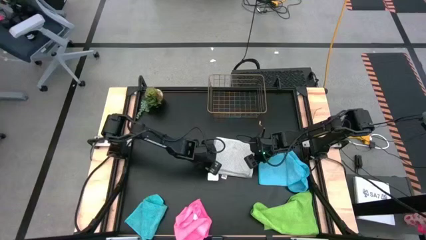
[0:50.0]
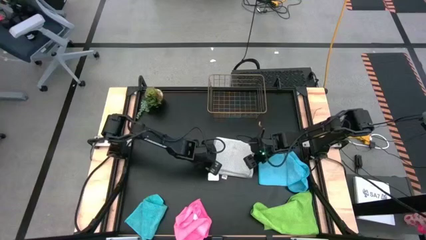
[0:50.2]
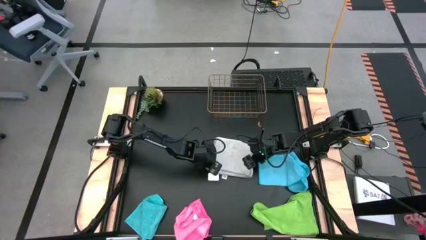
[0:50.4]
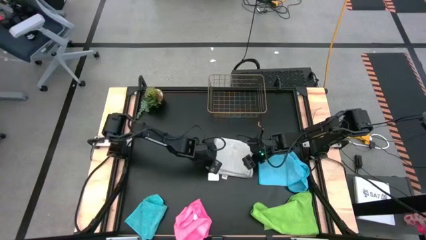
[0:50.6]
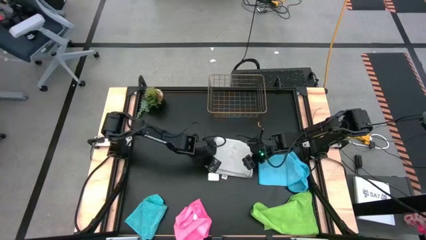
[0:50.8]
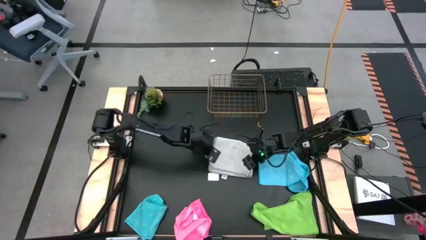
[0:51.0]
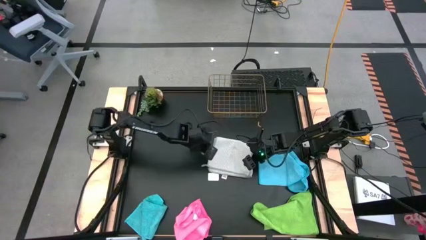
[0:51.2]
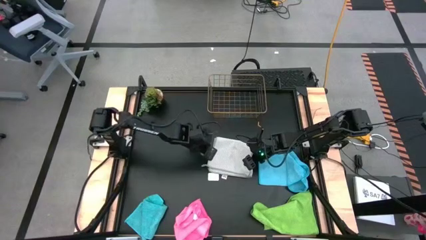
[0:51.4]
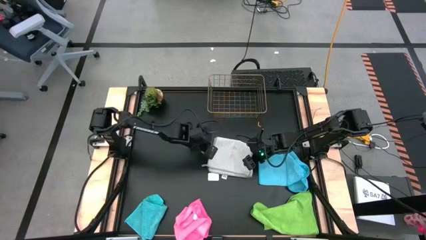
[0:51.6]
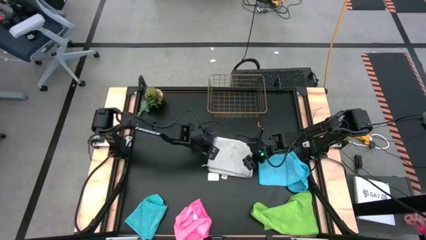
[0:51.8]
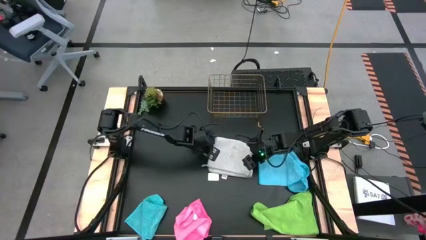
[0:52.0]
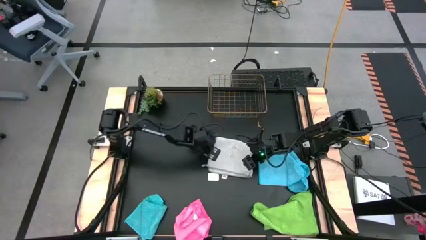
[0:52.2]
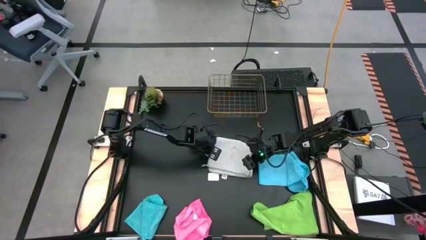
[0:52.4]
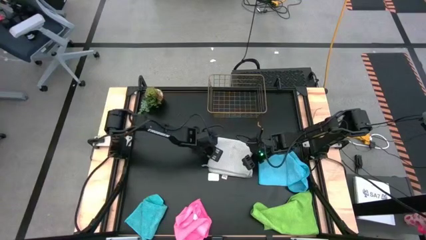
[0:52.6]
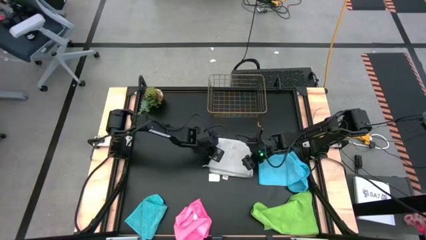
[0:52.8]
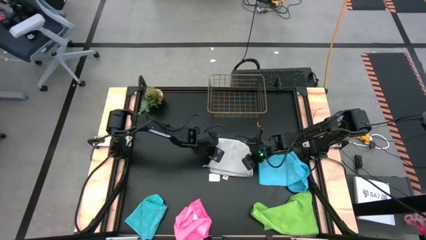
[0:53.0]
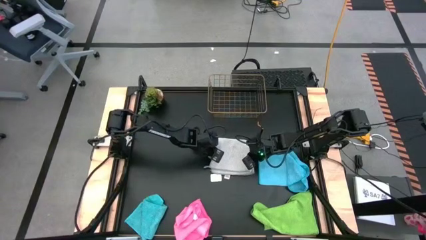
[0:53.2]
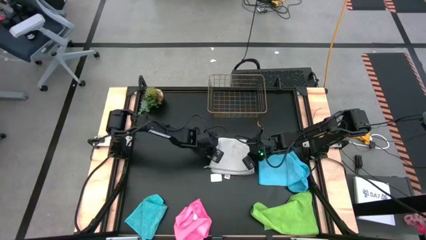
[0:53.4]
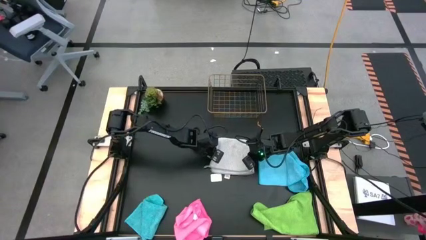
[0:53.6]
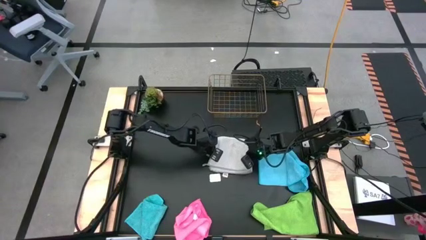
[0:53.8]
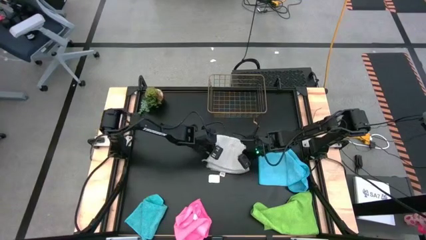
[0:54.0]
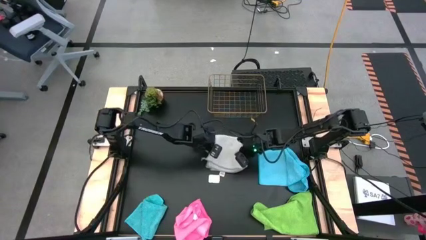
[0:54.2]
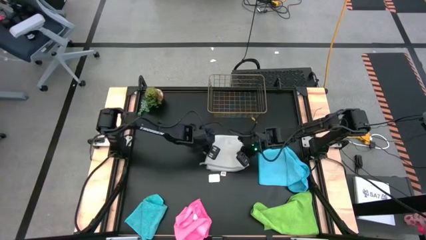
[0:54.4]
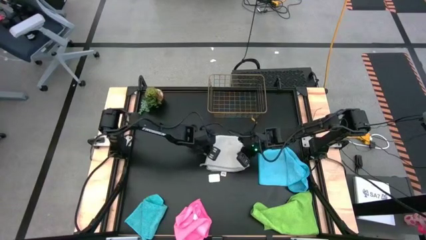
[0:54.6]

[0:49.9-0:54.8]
Task: Fold microfiber towels
Put the gray towel into the wire basket

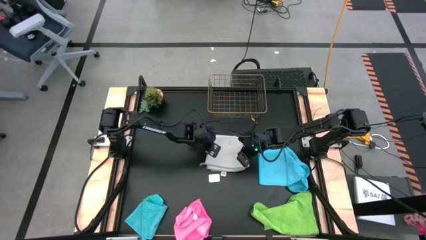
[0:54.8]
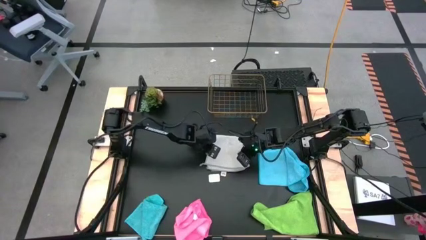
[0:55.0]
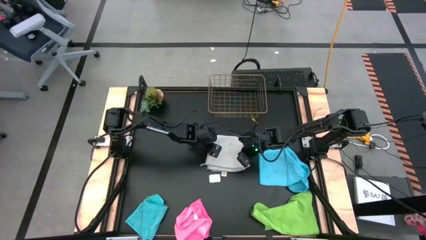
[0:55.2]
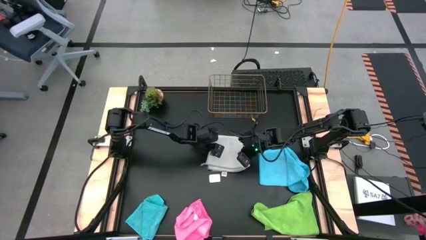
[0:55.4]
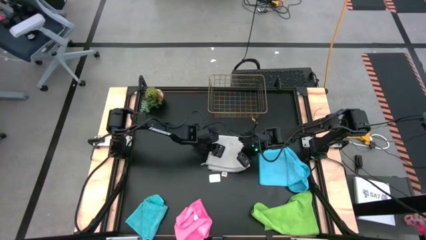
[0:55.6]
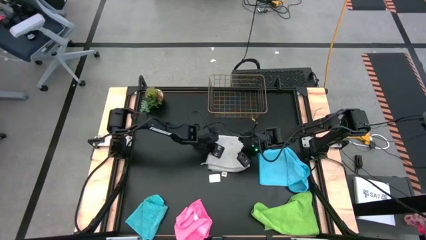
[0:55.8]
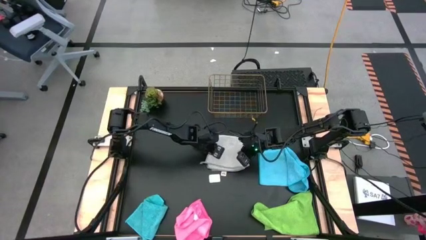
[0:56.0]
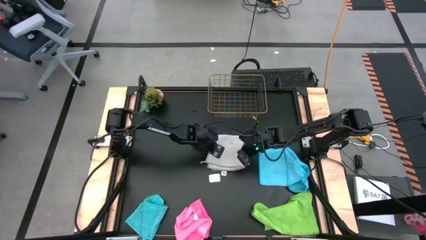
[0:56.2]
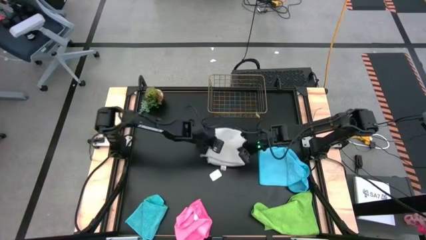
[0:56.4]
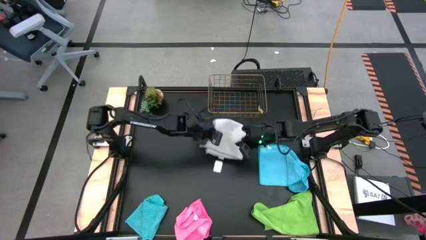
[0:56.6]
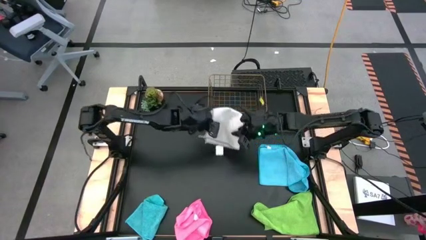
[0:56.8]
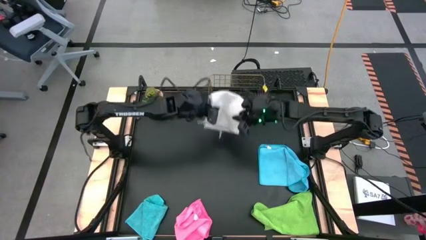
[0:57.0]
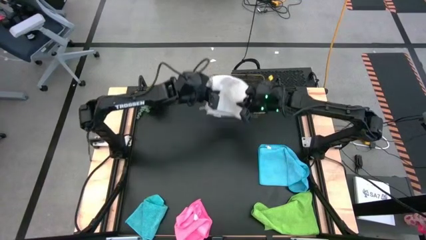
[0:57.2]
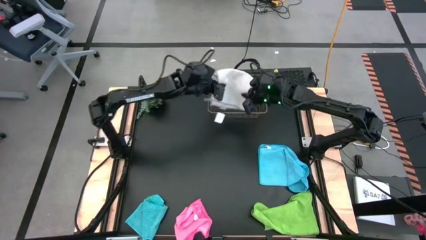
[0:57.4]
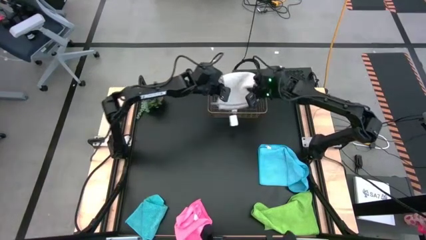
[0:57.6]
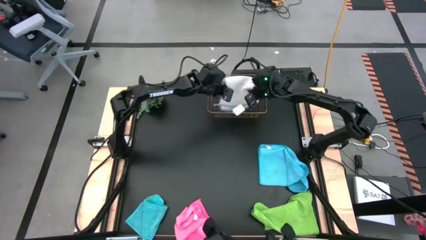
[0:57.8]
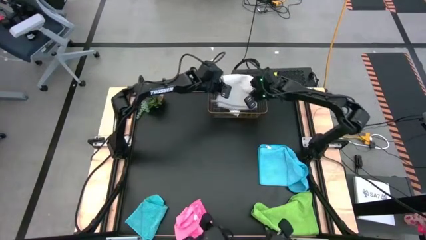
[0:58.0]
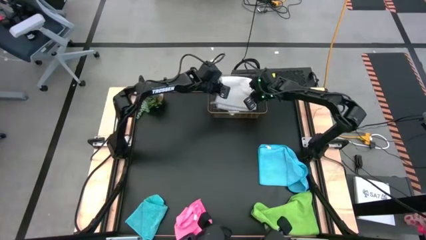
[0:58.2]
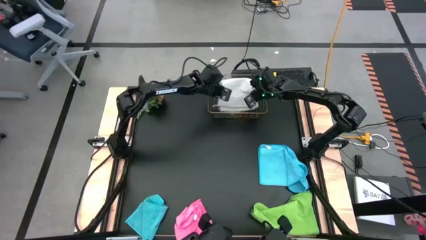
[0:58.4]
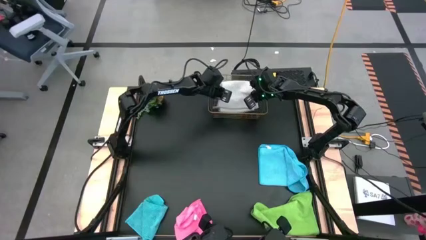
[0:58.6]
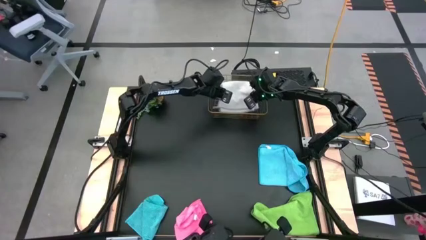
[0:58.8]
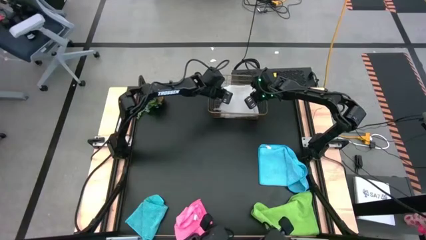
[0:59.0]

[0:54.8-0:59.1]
Put the gray towel into the wire basket

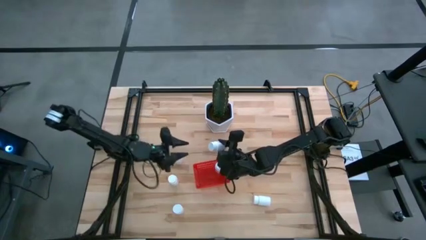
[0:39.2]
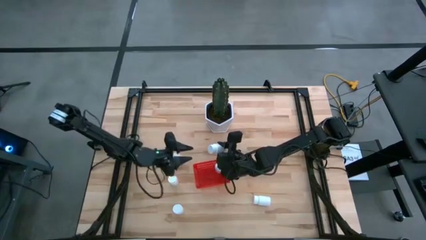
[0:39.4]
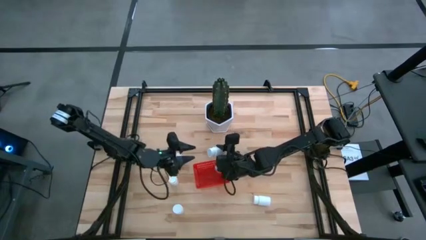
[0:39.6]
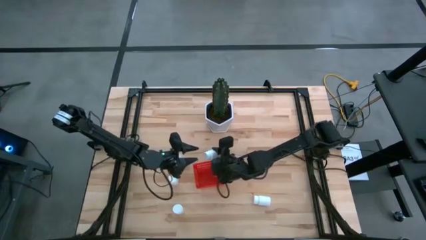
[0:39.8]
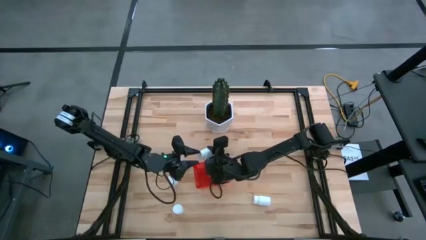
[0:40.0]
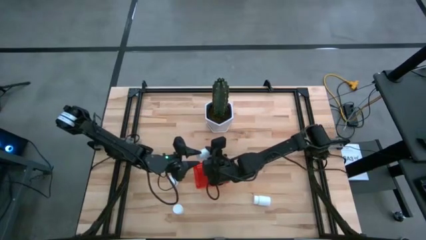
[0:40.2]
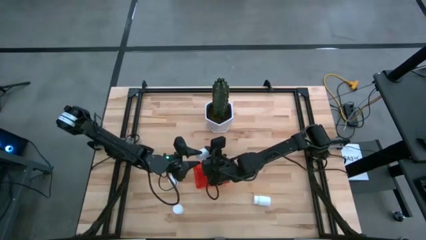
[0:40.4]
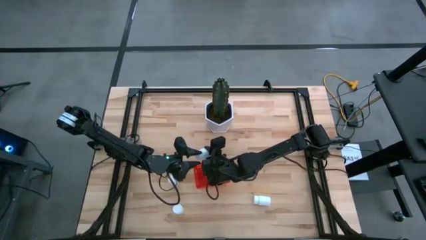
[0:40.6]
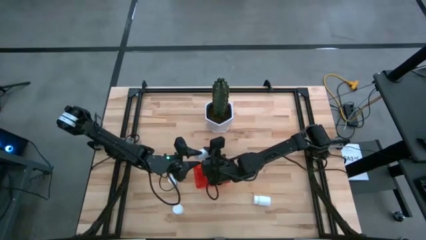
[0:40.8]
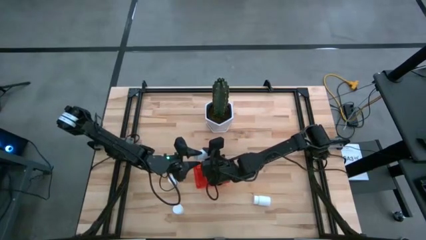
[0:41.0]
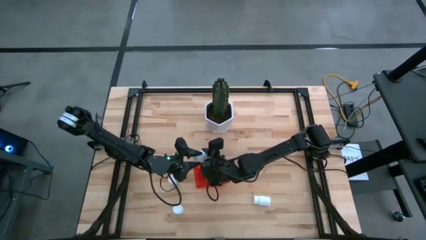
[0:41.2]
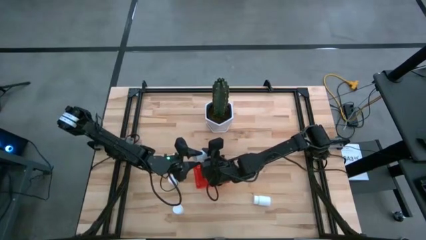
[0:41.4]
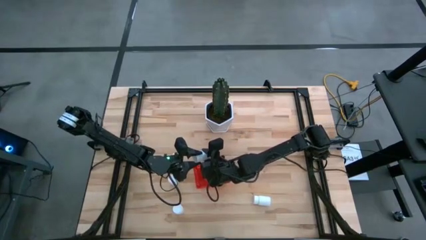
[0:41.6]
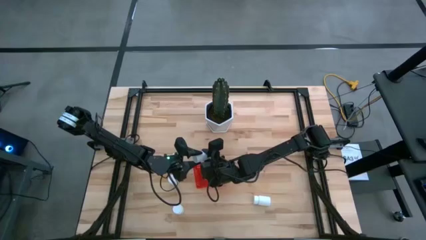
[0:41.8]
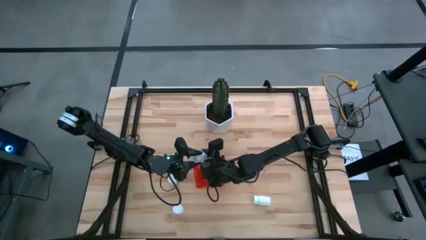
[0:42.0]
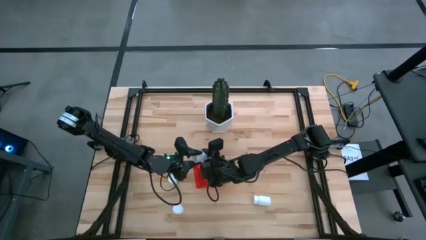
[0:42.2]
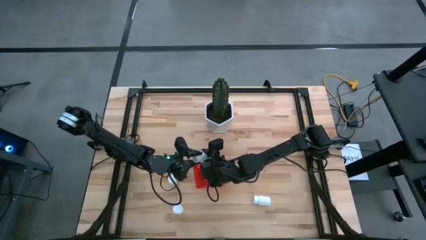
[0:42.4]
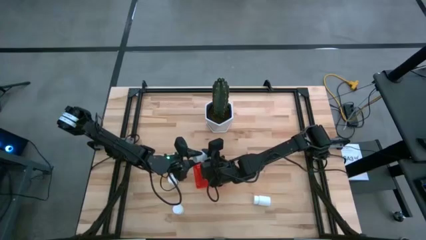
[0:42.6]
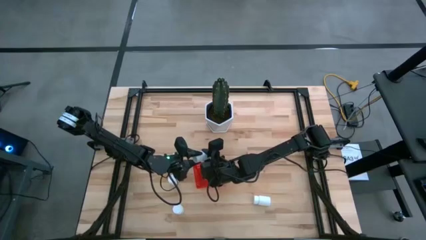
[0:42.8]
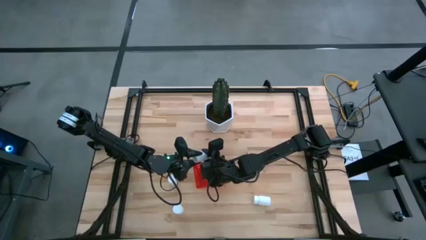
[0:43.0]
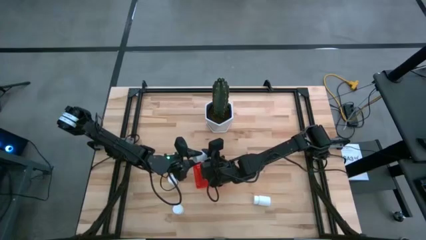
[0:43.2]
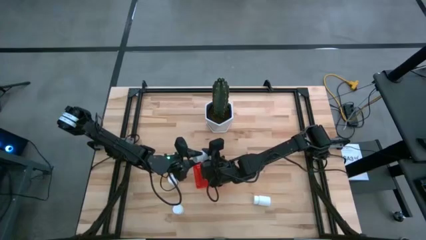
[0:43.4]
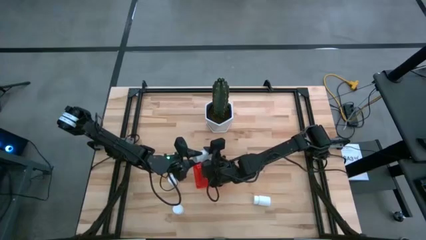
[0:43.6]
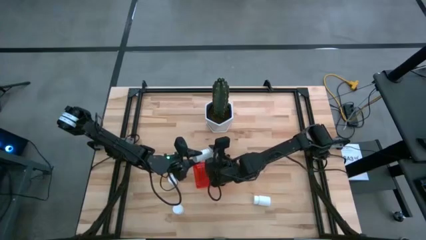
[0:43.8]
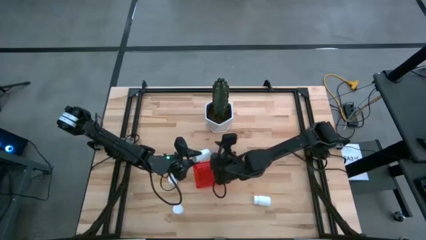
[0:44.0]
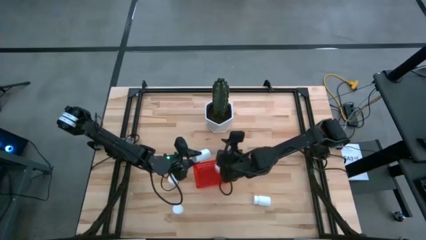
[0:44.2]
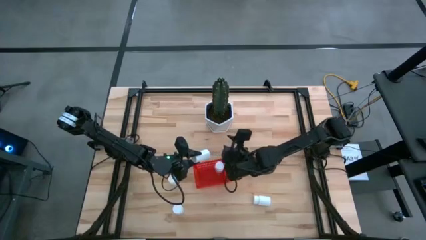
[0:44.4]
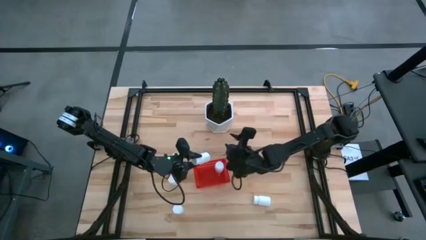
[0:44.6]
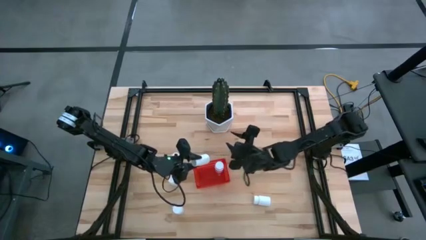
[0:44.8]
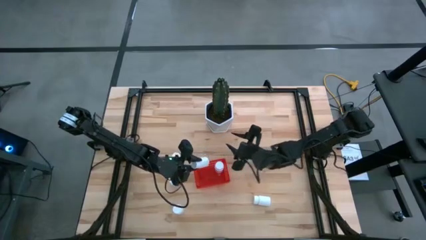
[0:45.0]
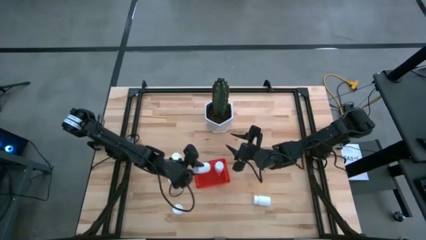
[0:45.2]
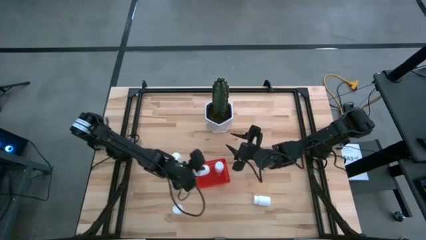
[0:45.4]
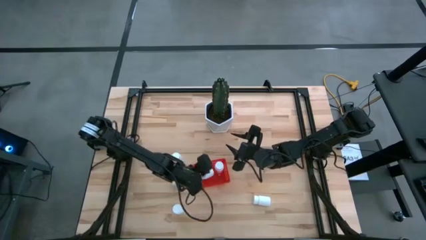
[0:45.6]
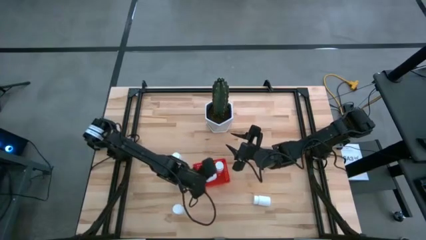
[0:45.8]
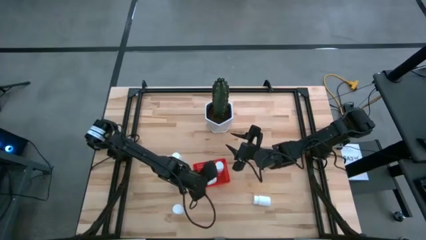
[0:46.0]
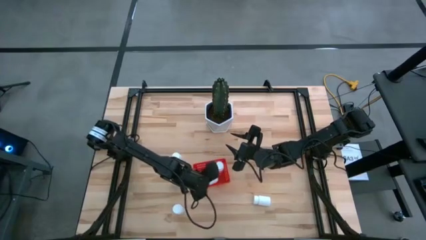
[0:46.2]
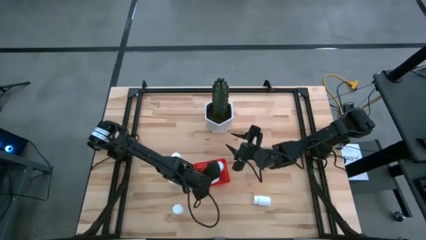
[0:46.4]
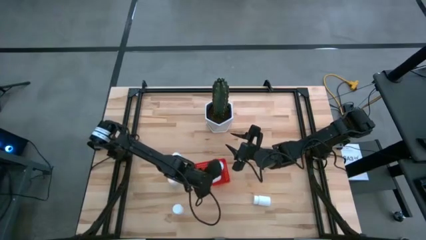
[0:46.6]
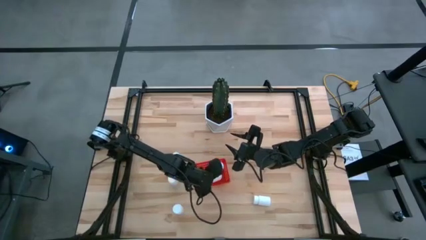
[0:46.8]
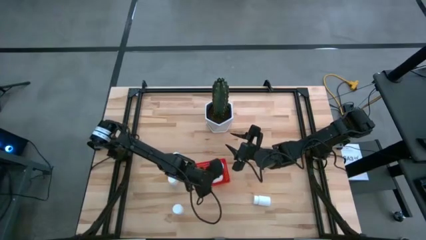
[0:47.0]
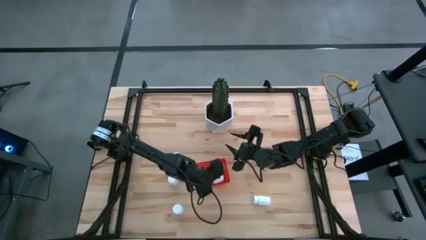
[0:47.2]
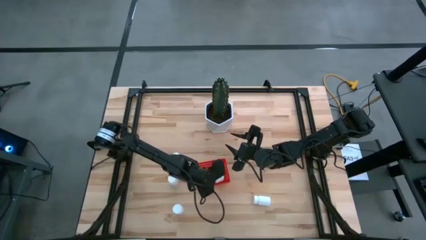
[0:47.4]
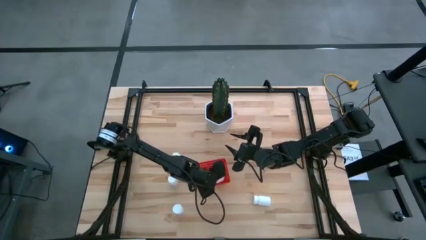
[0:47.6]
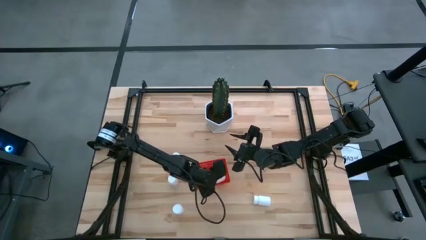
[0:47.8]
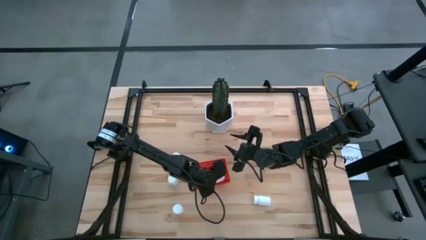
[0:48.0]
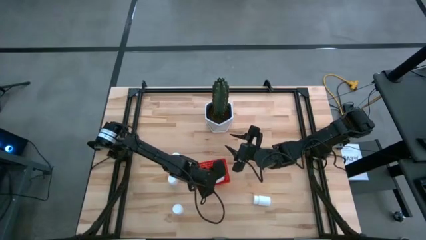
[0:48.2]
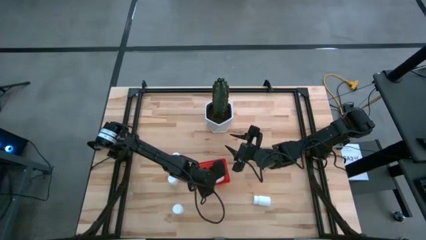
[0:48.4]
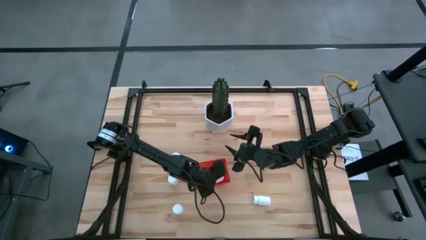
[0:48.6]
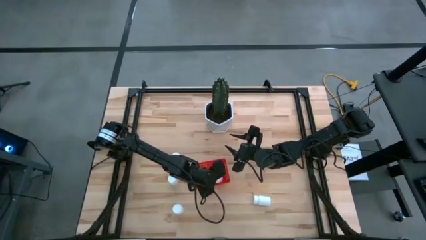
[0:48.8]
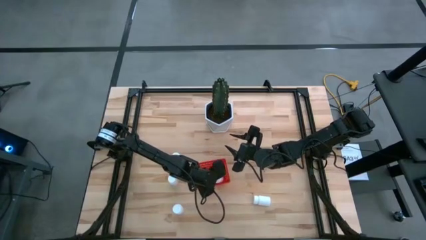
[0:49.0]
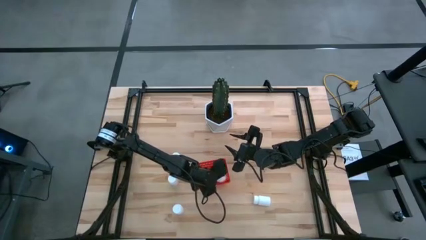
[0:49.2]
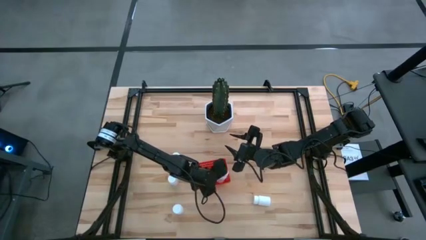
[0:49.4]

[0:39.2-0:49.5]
Task: Pick and place pill bottles into a basket
Put the white pill bottle into the red bin
